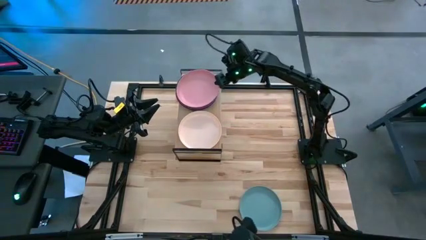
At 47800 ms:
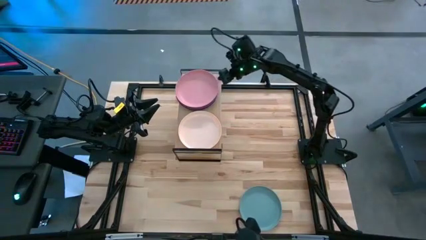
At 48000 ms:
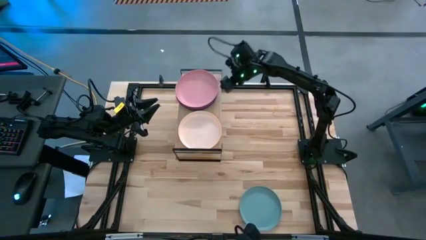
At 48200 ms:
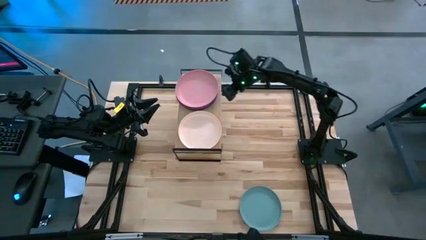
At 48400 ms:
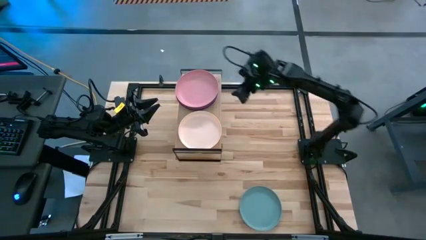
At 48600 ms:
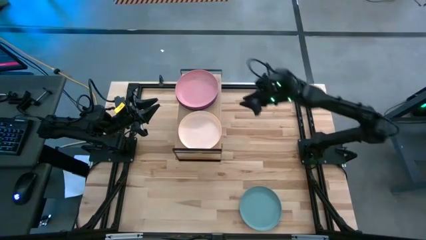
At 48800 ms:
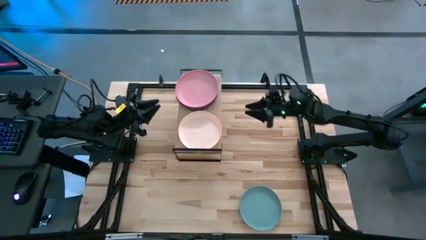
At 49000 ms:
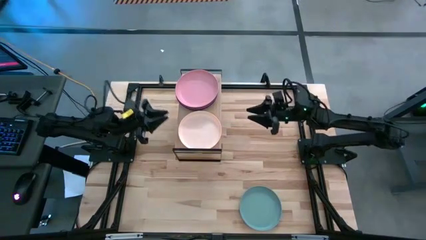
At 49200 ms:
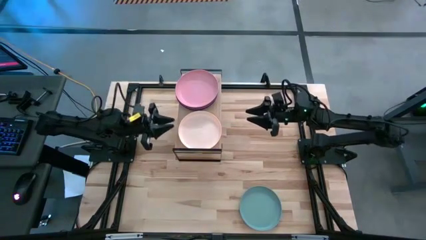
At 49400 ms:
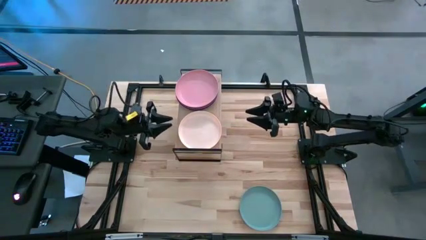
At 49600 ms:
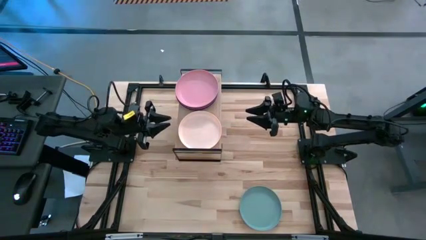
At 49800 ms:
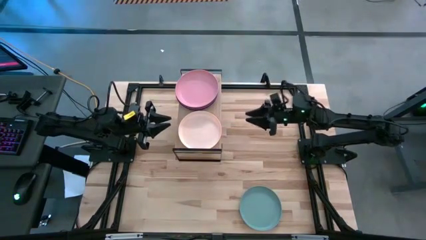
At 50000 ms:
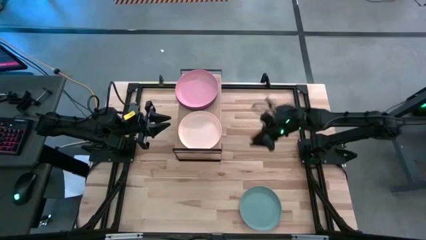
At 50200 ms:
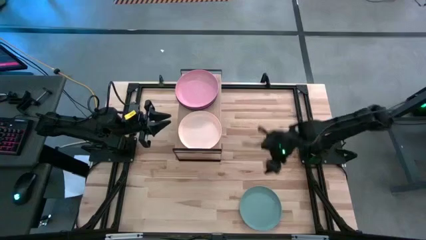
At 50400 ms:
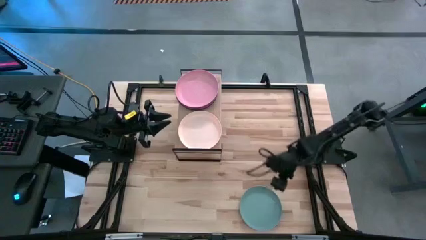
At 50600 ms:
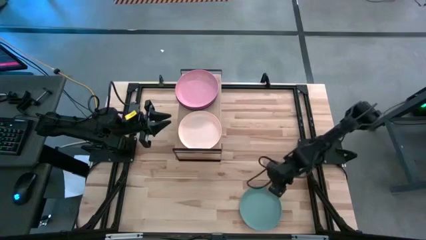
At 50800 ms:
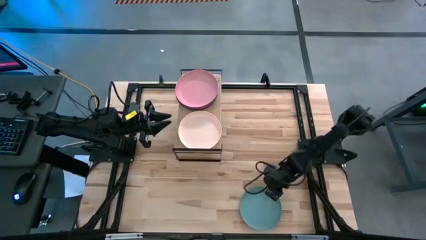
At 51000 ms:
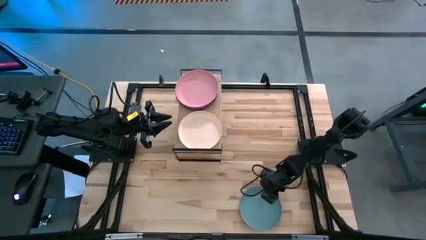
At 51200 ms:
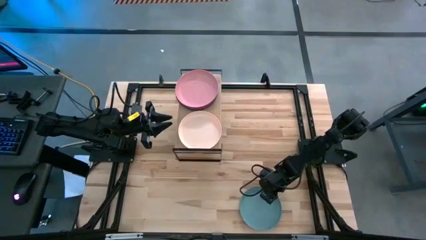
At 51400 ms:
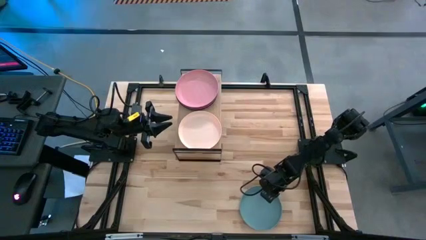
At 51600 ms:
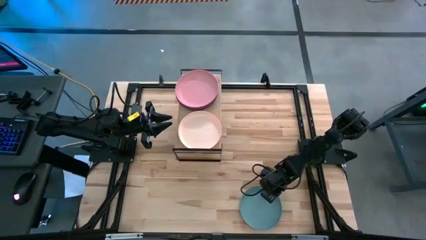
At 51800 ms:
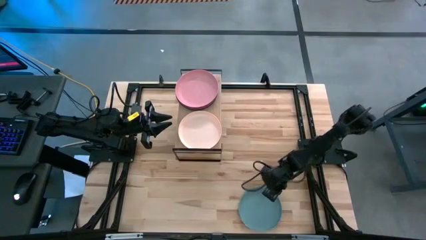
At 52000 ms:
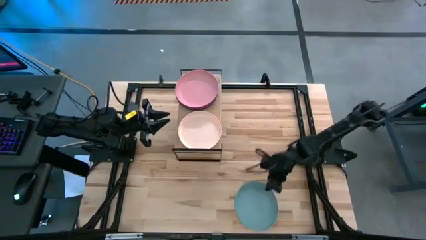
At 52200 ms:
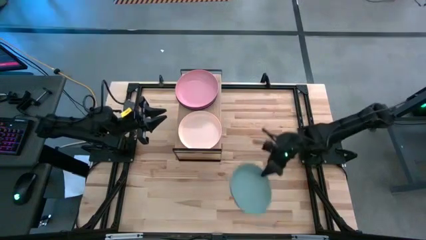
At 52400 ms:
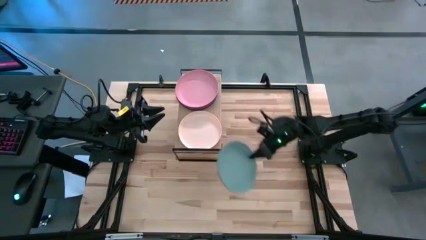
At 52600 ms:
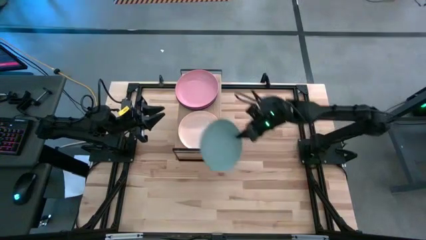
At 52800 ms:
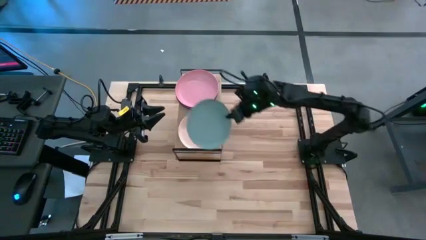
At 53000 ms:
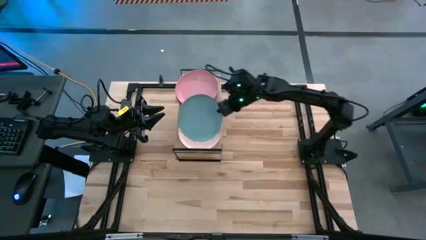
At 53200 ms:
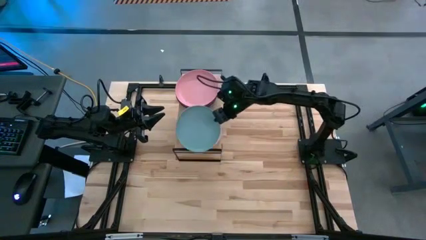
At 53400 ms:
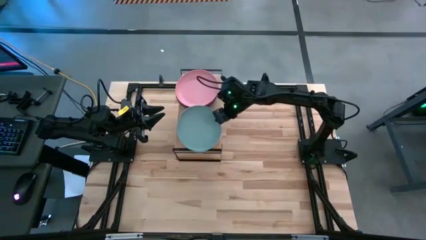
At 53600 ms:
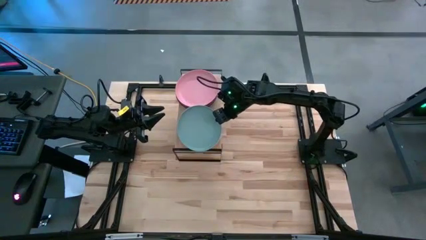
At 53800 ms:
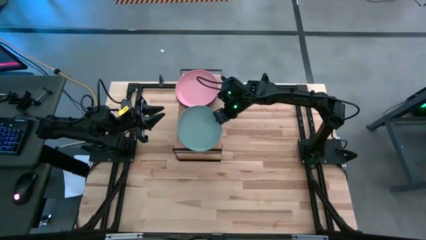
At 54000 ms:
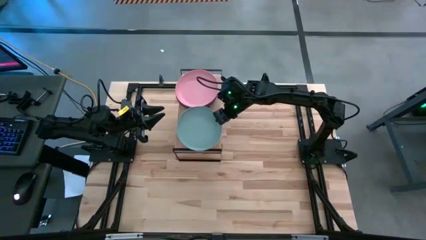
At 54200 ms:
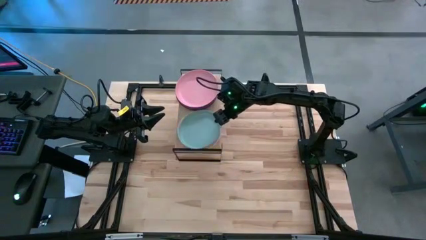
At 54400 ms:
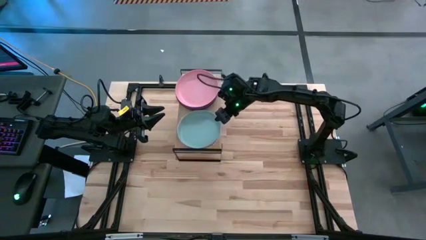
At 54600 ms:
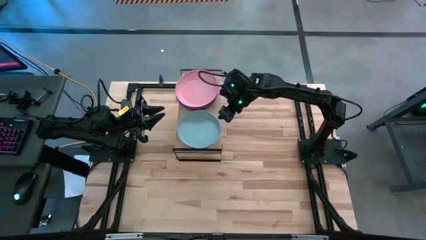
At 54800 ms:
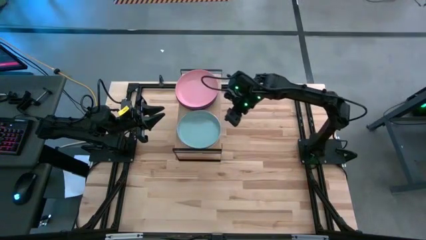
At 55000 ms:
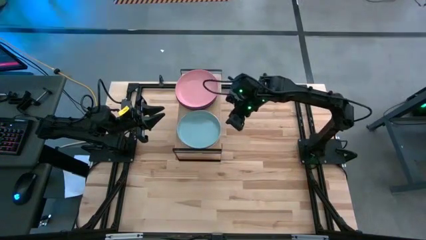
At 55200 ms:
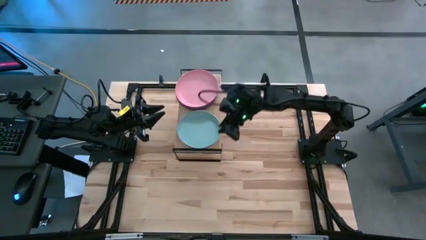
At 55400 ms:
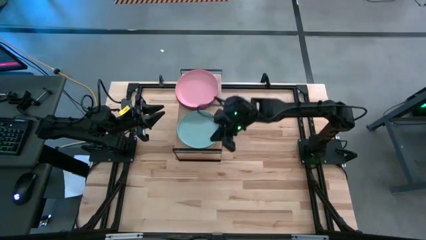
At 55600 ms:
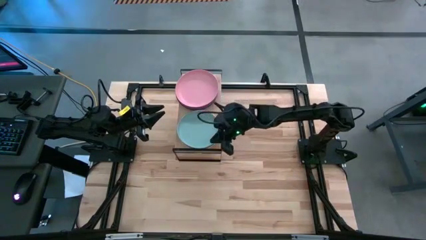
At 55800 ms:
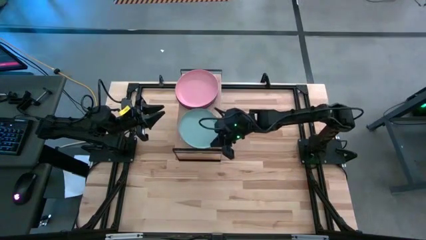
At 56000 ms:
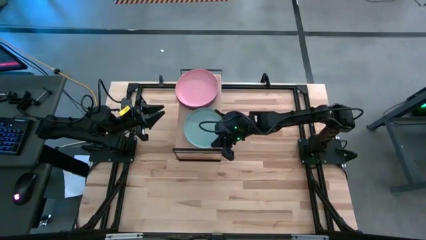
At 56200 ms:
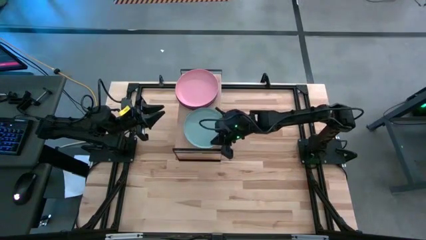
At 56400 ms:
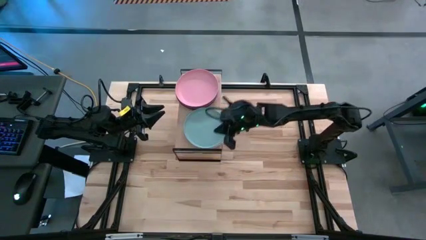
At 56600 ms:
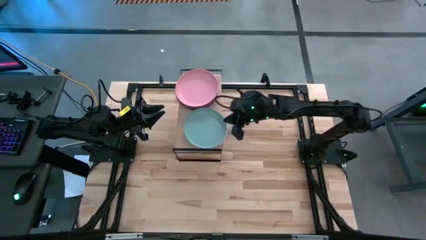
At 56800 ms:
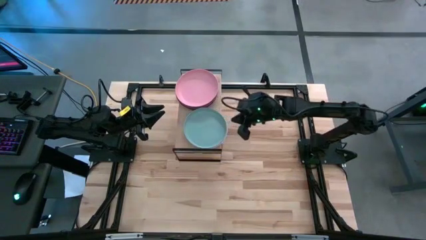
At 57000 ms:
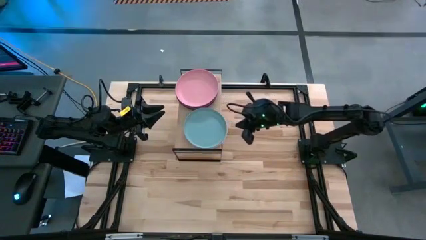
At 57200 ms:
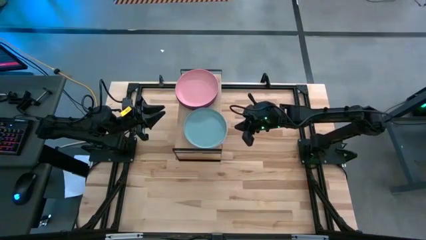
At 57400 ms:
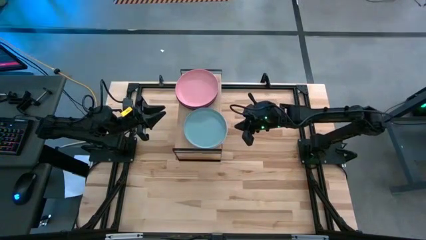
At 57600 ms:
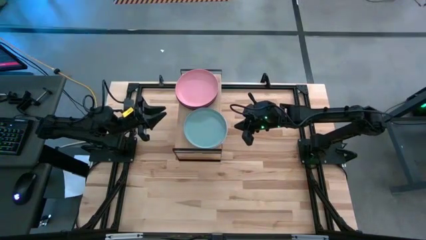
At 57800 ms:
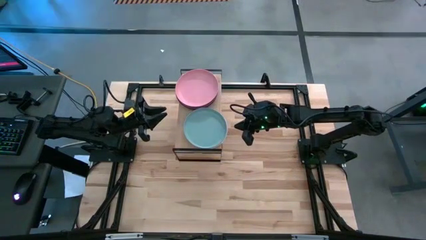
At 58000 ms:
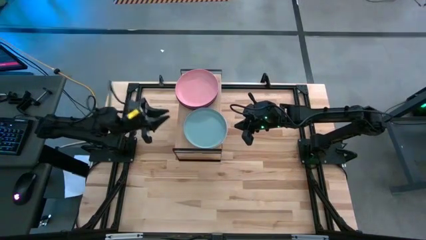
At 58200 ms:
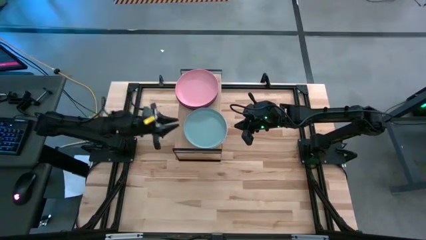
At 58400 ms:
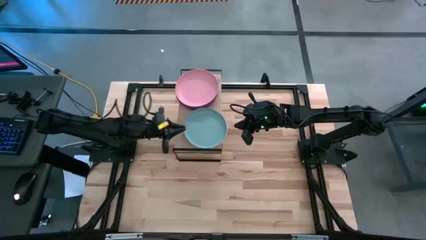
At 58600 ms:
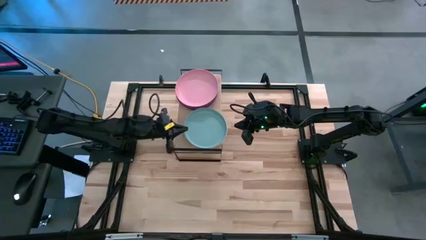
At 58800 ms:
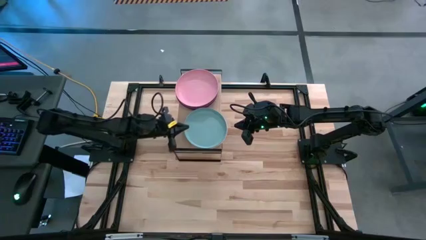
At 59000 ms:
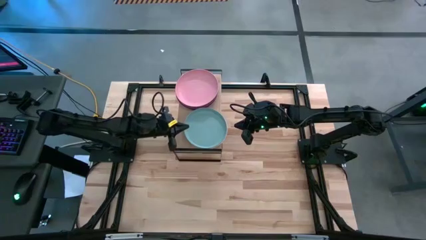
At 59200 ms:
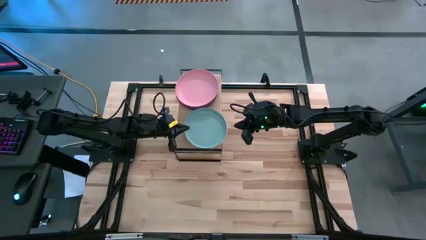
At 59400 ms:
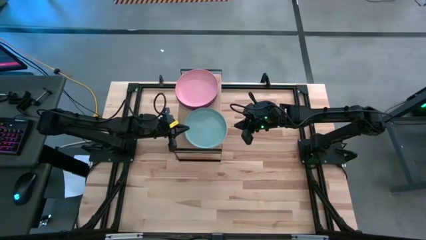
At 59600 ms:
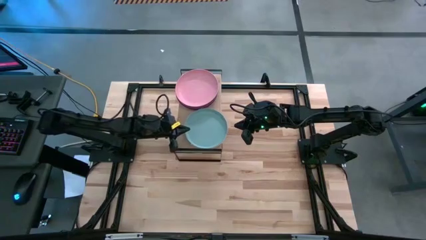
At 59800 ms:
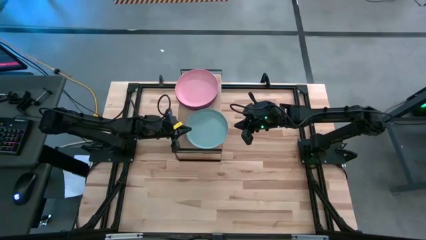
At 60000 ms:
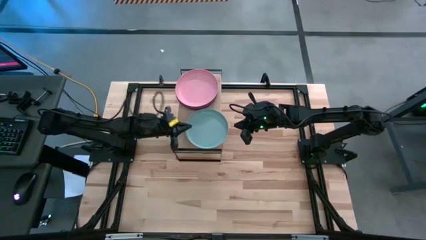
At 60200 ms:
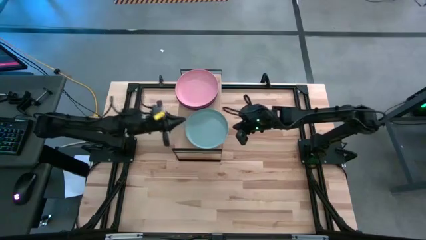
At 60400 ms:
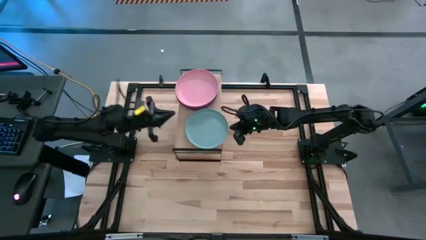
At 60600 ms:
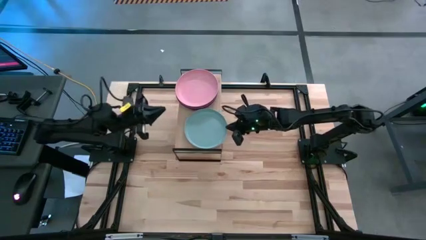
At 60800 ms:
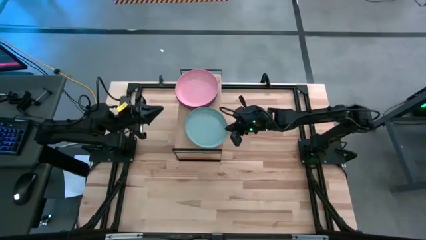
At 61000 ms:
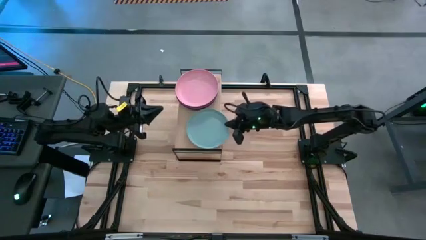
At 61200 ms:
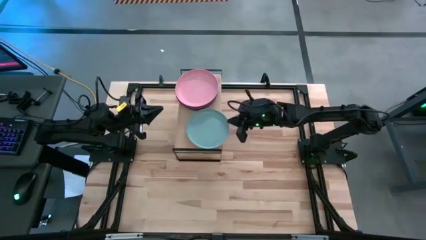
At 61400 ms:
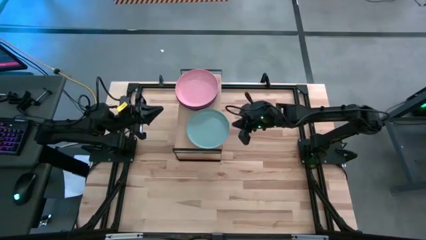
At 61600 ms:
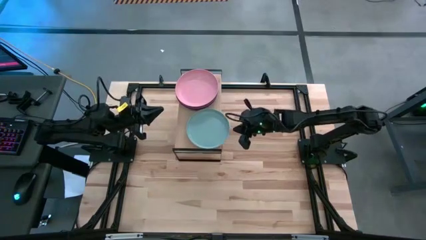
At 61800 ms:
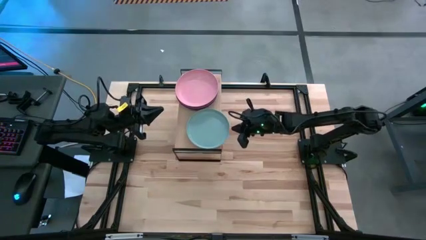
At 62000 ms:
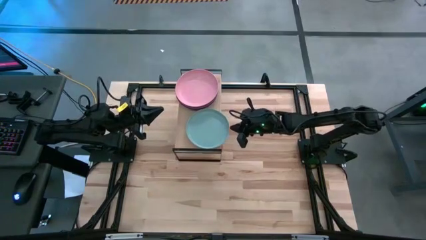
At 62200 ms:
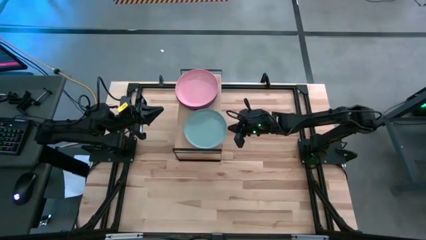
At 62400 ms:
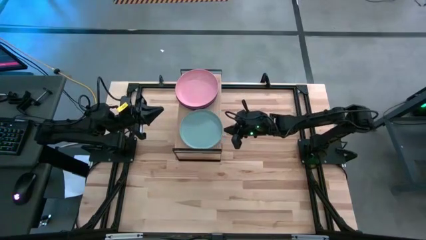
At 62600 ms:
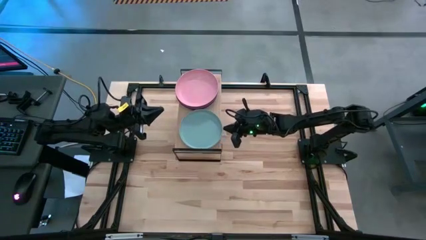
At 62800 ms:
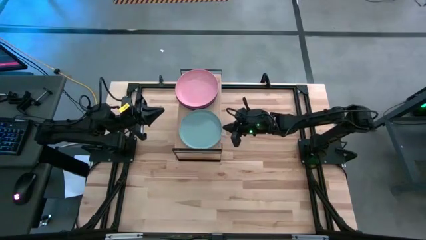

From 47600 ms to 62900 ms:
Task: Place and stack plates onto a shelf
Stack the gray plate on top of the light orange plate on the shelf
